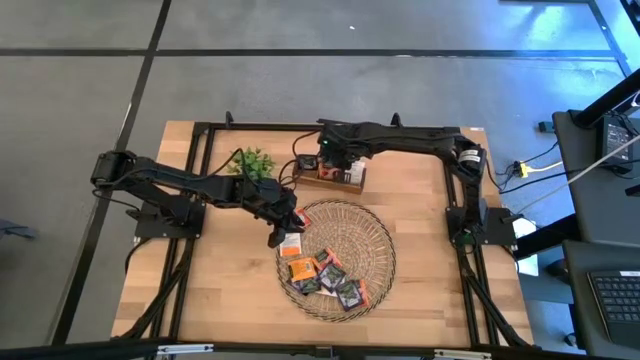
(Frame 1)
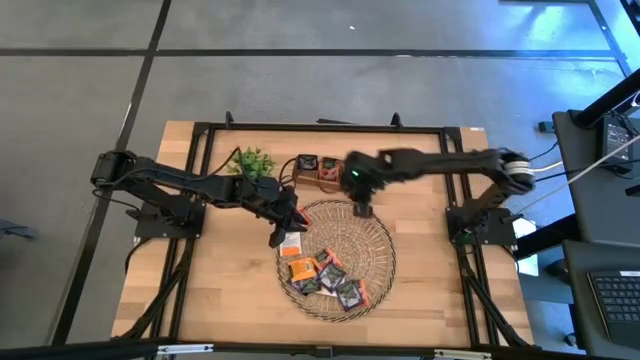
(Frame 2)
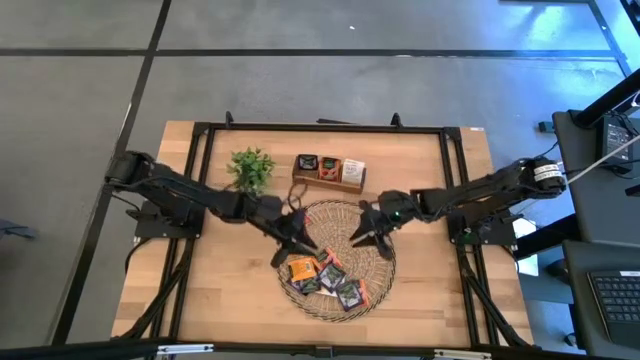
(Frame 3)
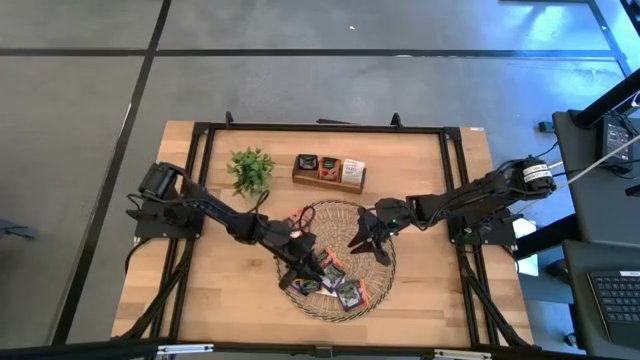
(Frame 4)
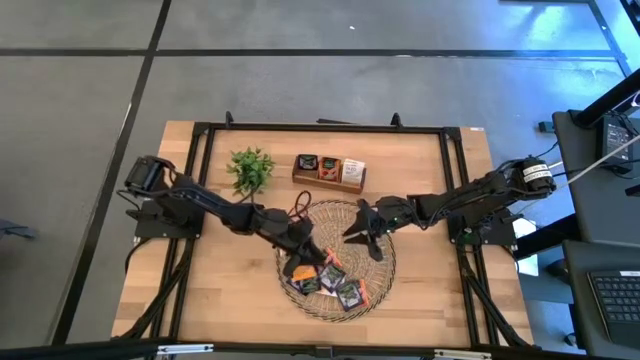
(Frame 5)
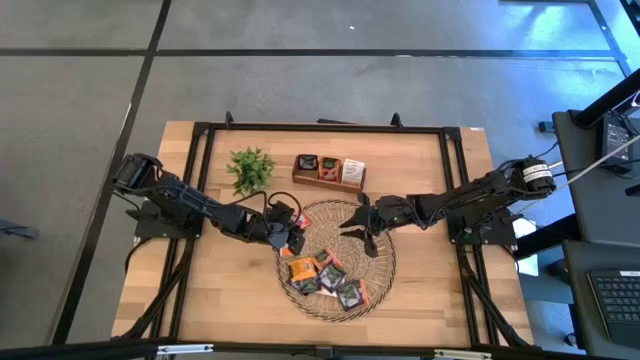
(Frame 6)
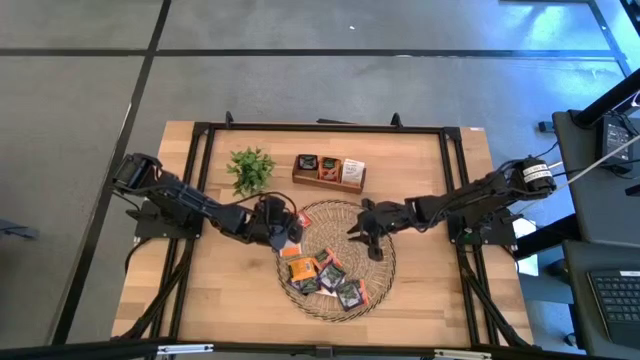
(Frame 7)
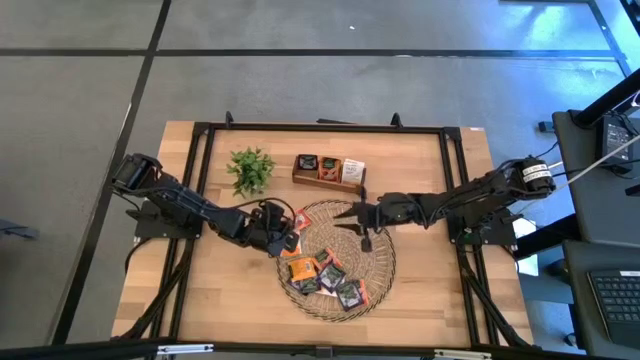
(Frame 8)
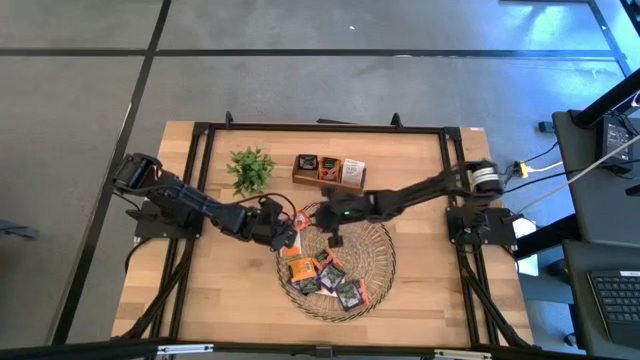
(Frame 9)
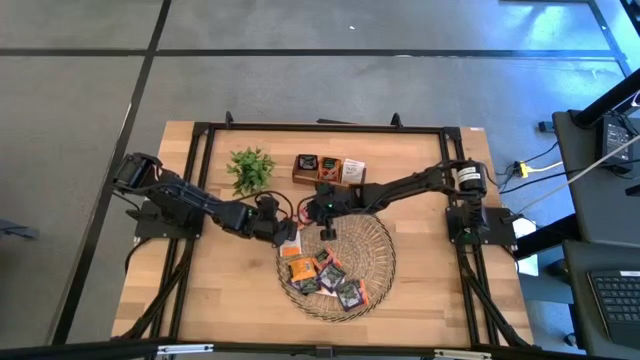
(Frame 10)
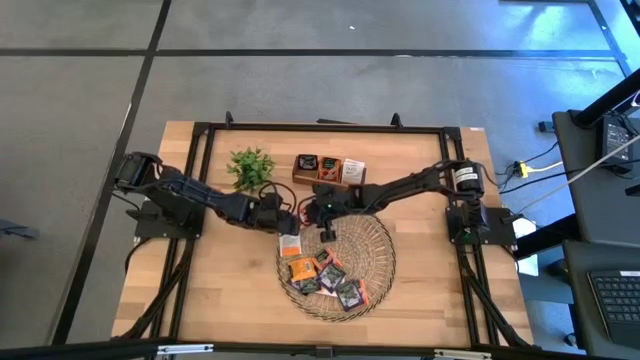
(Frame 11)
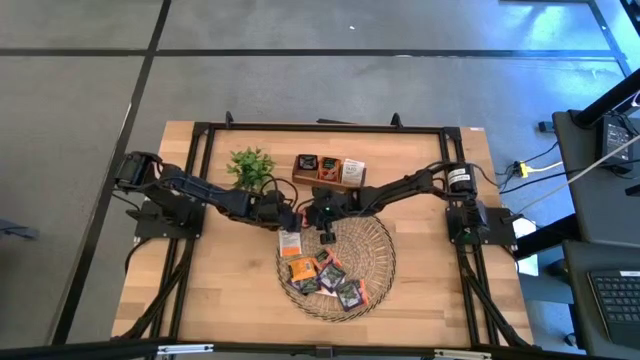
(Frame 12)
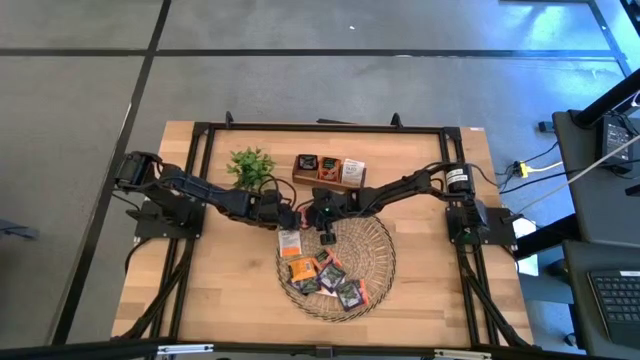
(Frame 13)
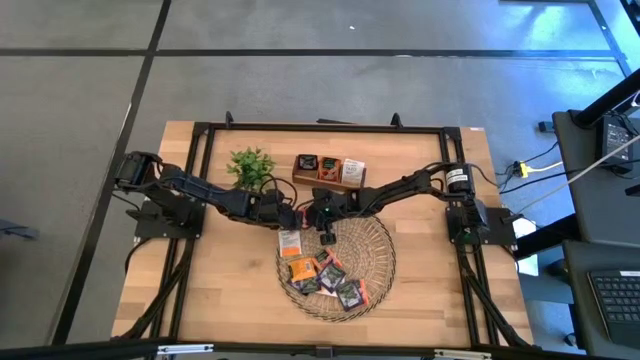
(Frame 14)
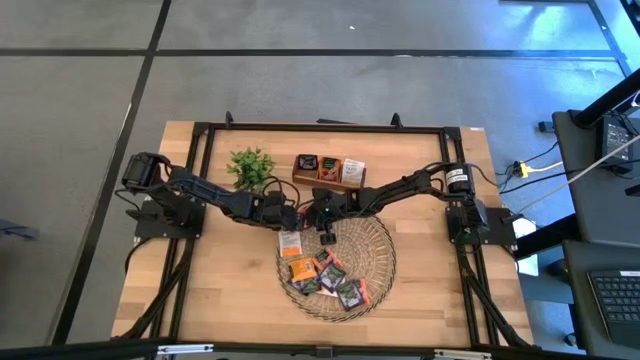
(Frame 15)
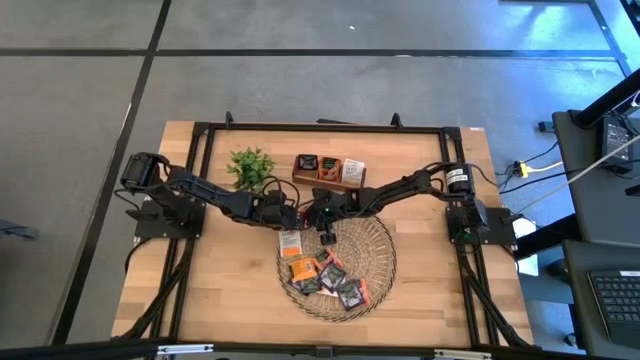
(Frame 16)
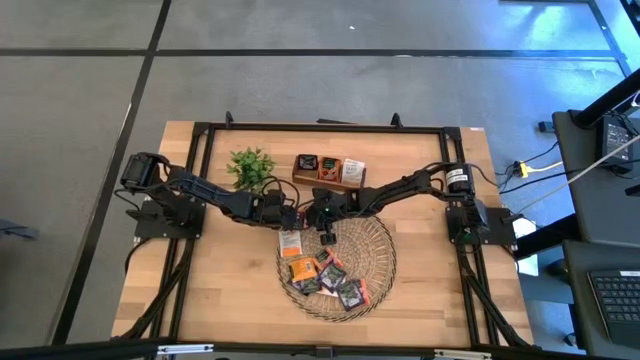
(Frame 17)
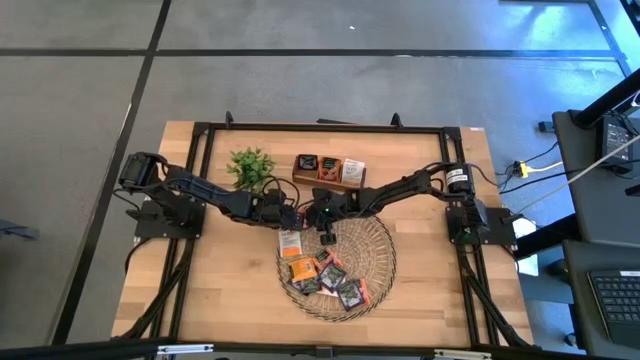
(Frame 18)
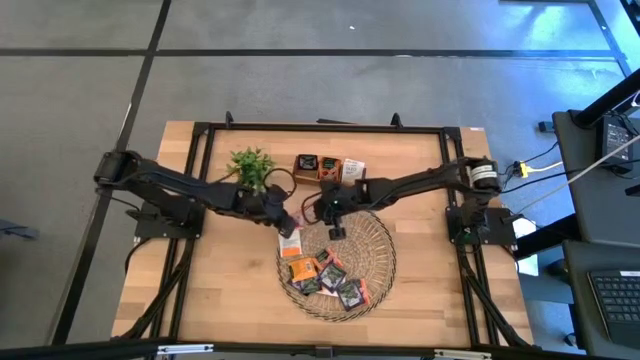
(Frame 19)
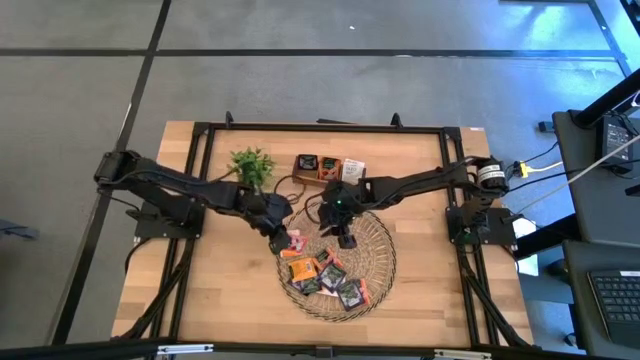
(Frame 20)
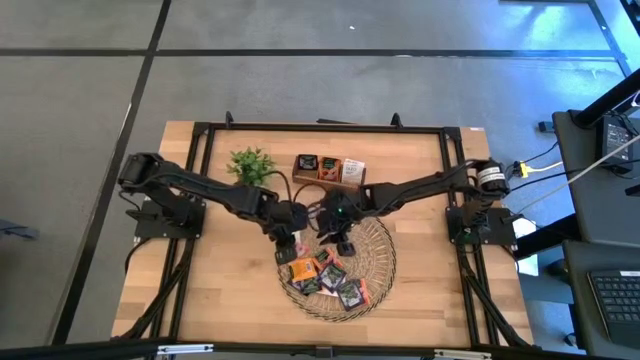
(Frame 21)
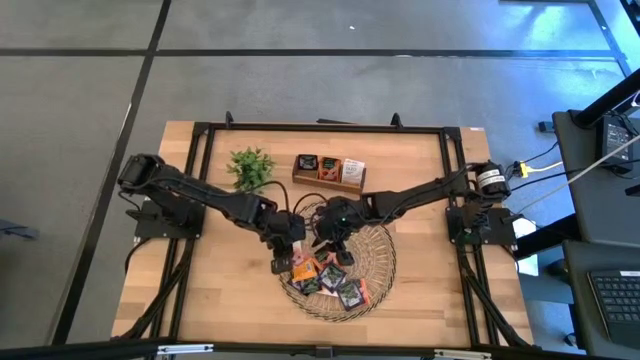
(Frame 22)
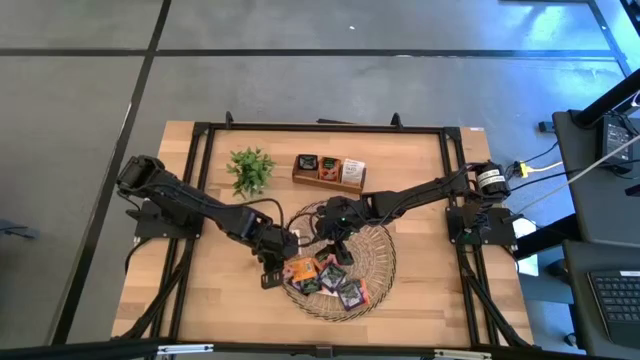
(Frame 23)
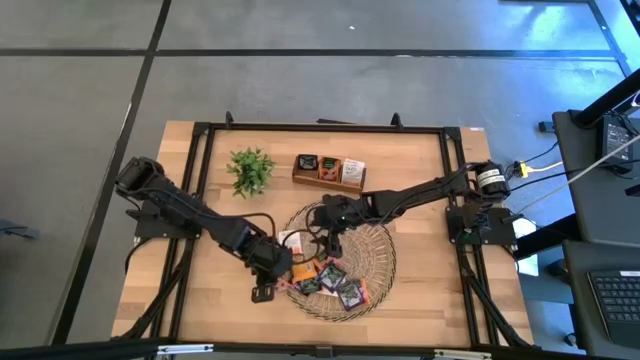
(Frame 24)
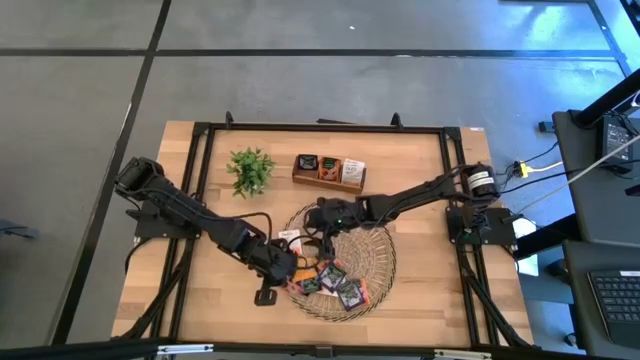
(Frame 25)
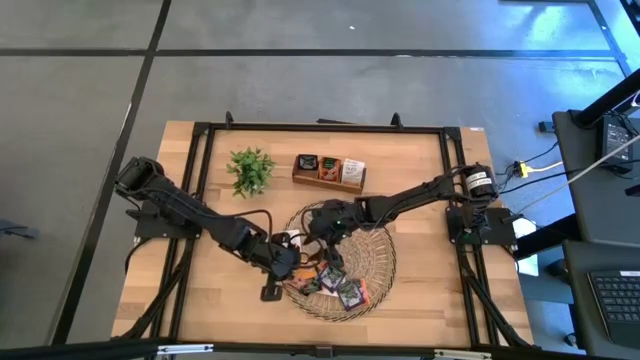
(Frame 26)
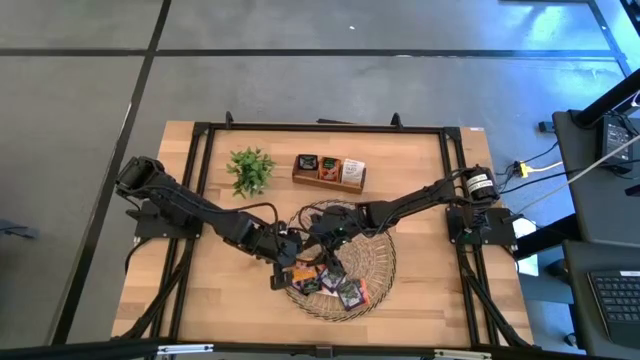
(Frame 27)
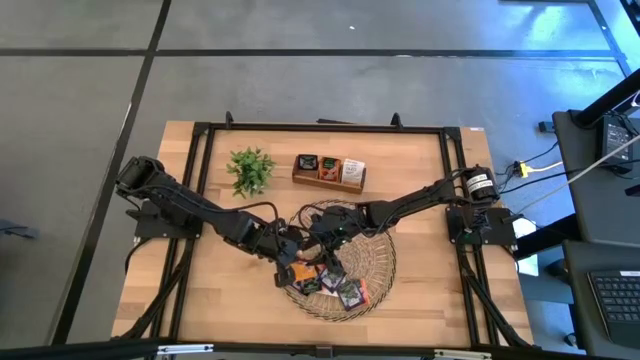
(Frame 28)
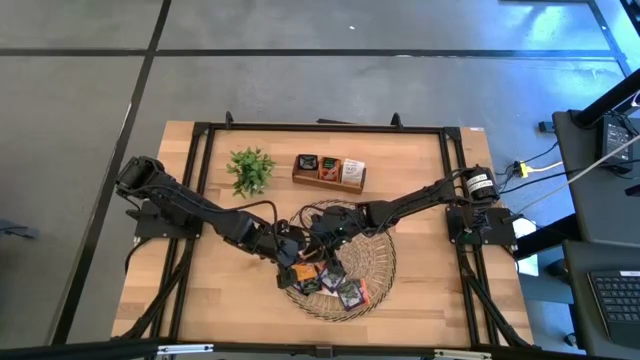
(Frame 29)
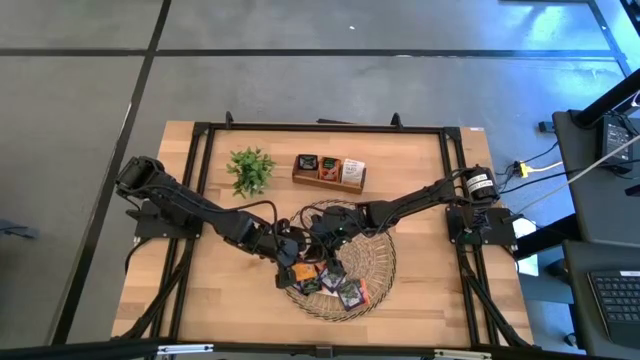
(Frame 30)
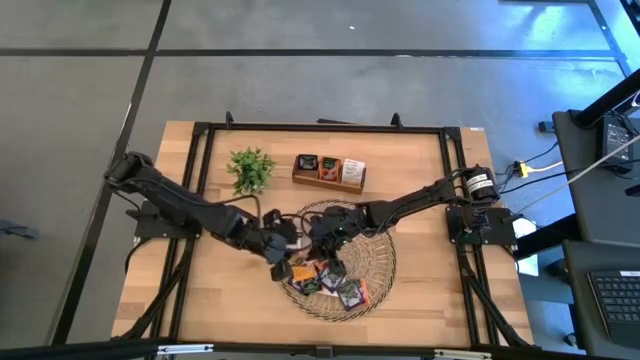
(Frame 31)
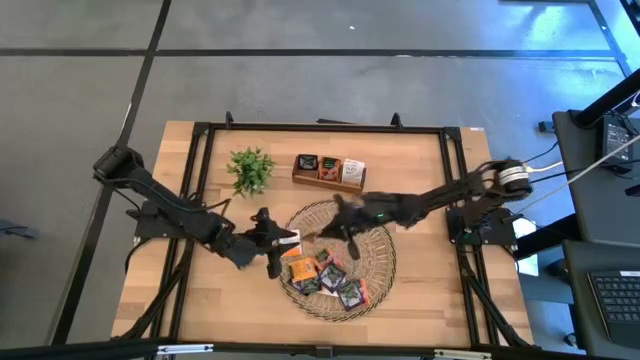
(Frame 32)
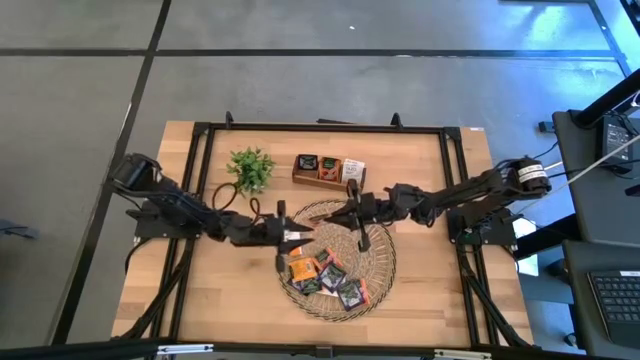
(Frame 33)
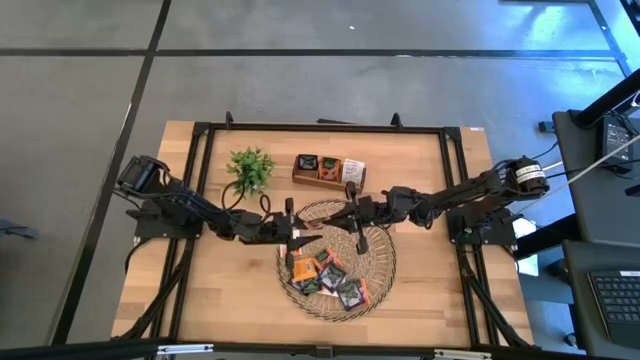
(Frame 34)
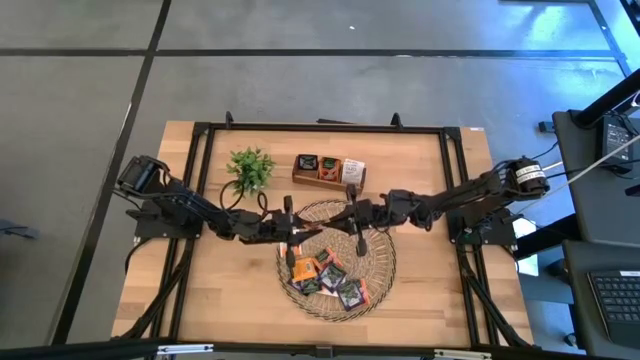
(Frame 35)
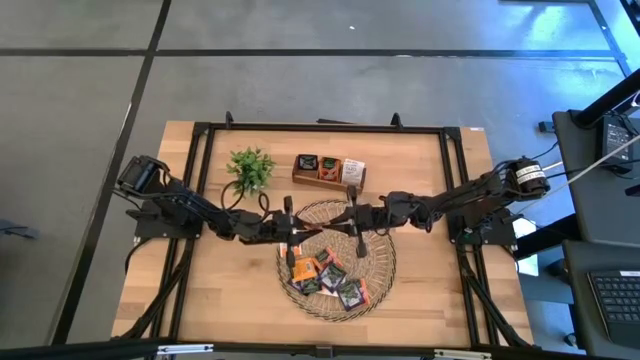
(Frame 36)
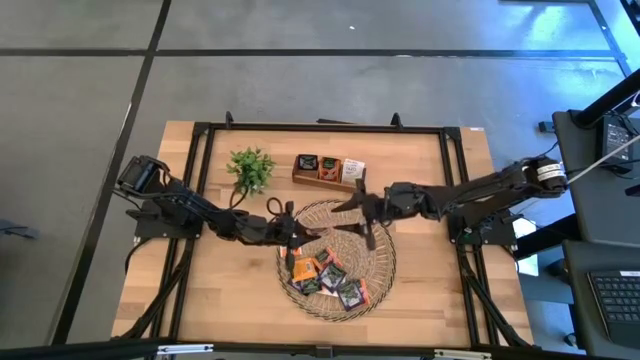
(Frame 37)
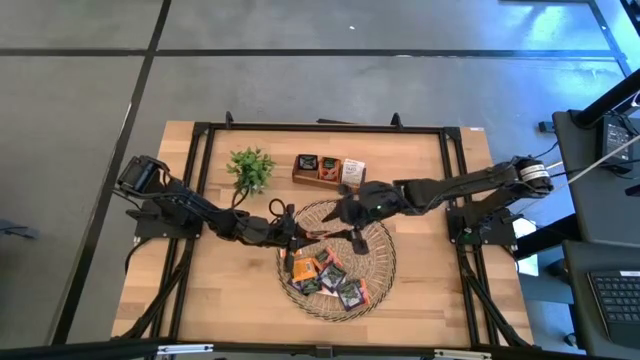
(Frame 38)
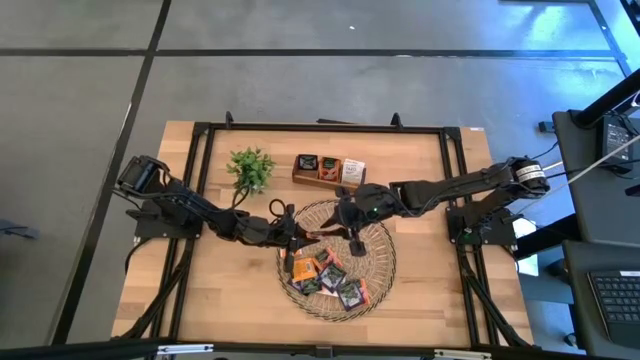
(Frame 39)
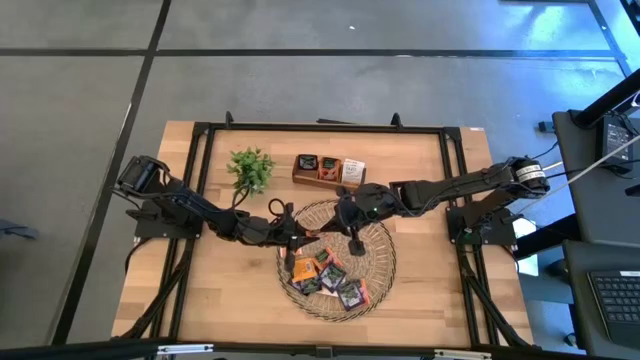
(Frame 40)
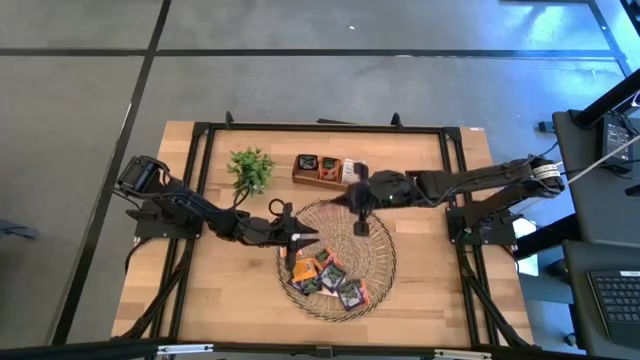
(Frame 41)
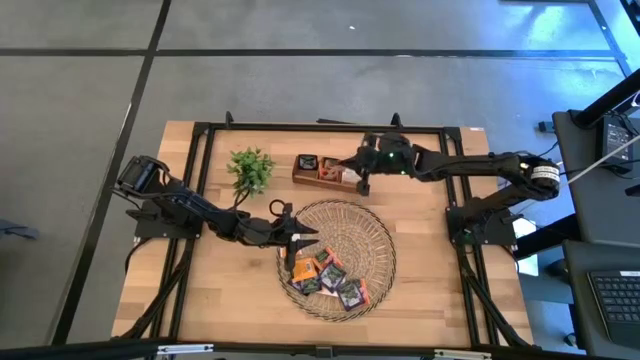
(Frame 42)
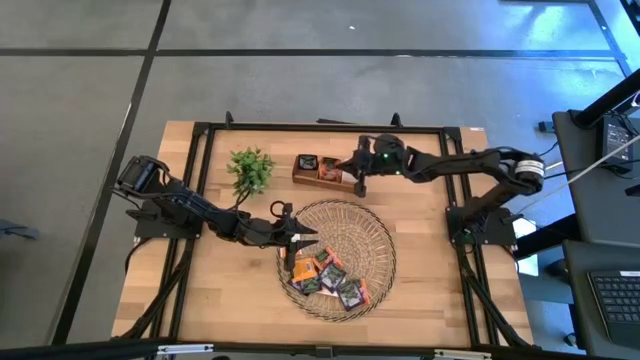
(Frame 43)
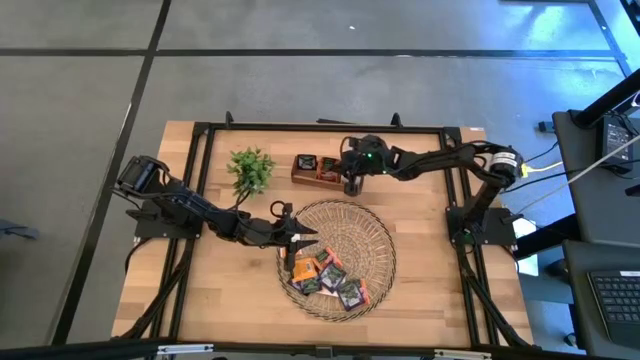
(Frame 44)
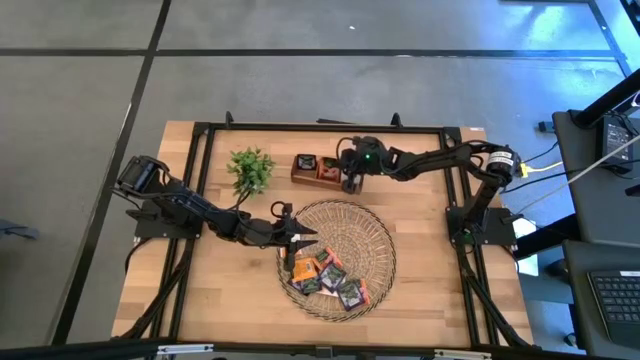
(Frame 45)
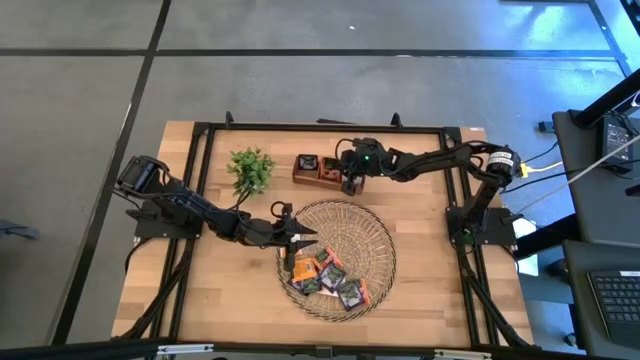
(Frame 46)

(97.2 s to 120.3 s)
Task: Pick & Place Tea
Put the orange and black tea bag into the middle section of the wooden organizer
